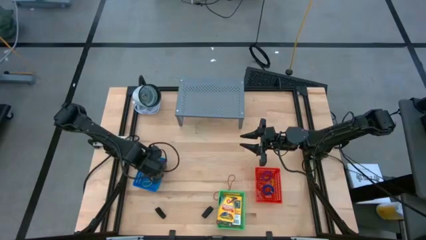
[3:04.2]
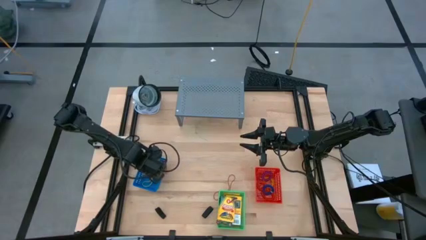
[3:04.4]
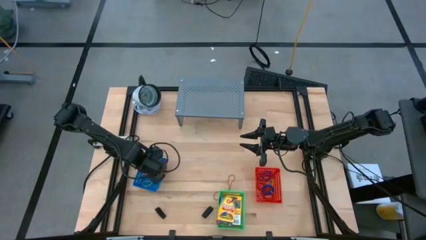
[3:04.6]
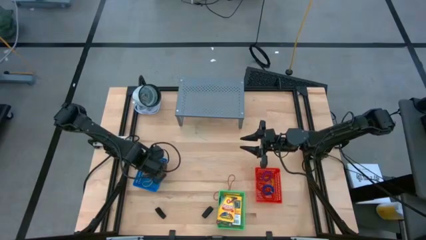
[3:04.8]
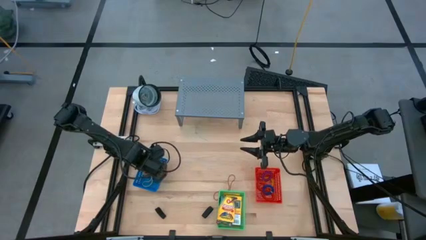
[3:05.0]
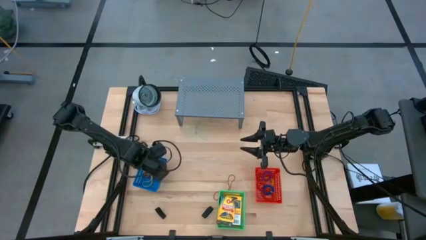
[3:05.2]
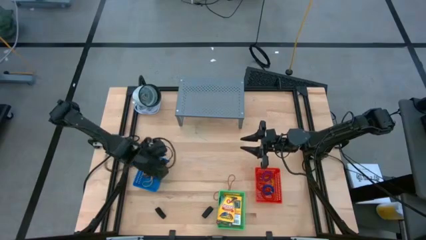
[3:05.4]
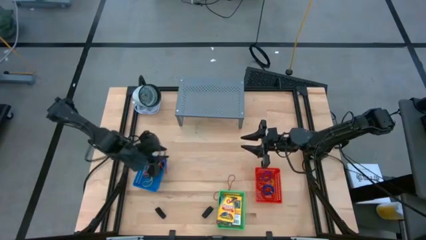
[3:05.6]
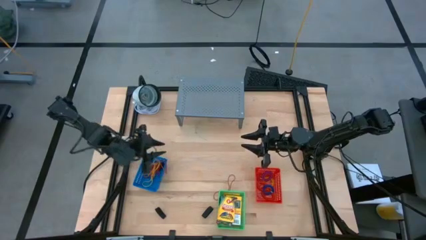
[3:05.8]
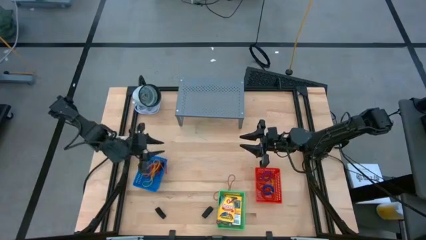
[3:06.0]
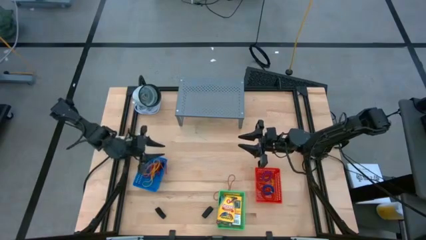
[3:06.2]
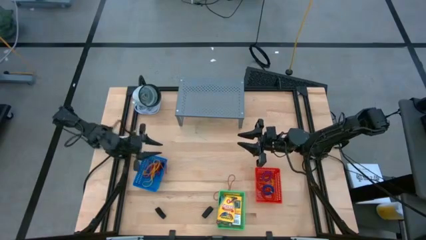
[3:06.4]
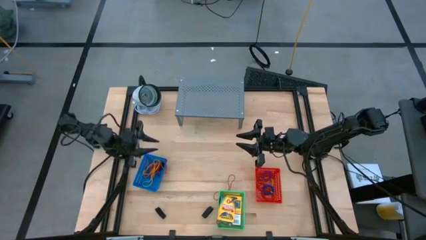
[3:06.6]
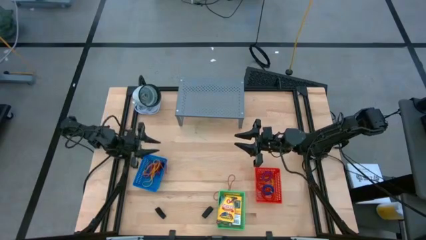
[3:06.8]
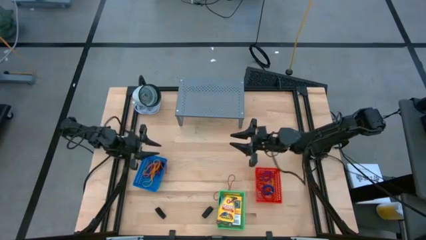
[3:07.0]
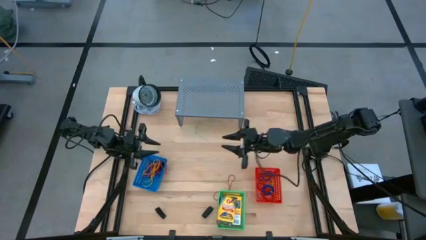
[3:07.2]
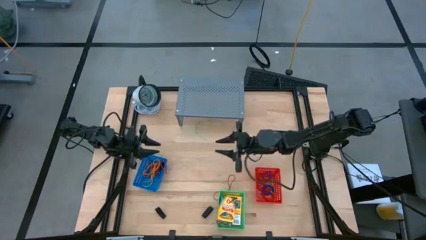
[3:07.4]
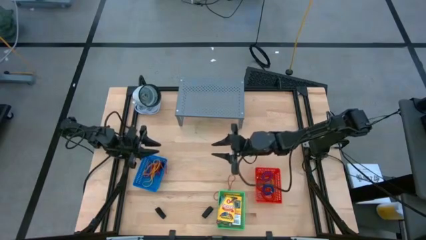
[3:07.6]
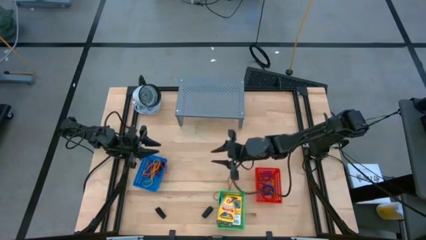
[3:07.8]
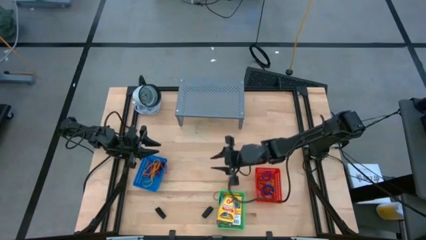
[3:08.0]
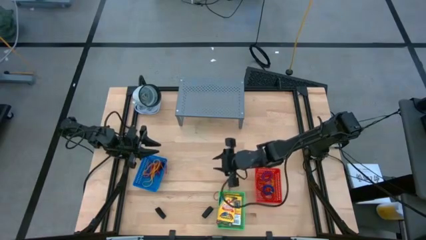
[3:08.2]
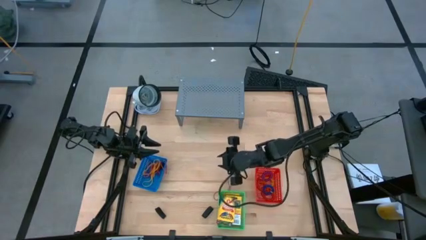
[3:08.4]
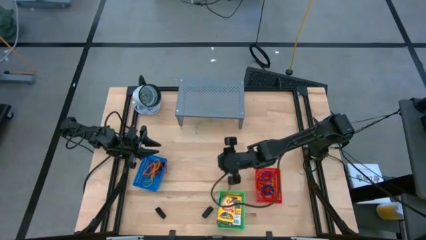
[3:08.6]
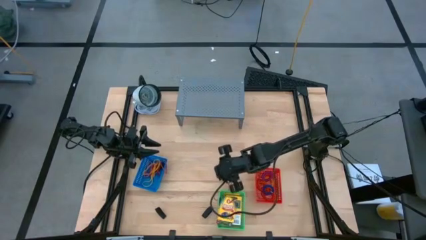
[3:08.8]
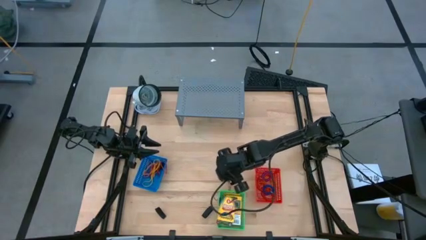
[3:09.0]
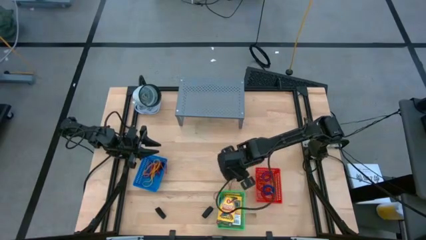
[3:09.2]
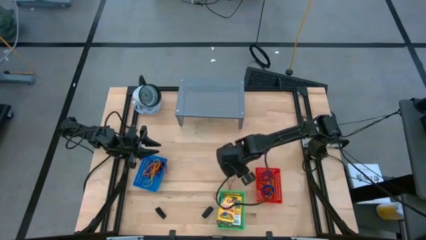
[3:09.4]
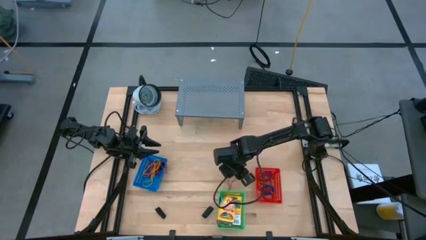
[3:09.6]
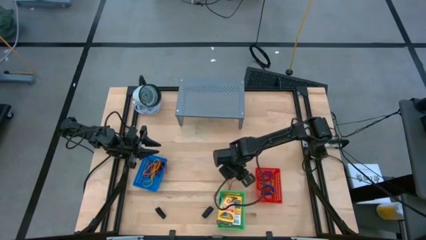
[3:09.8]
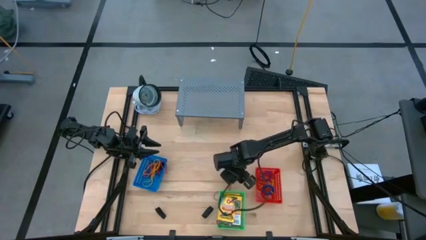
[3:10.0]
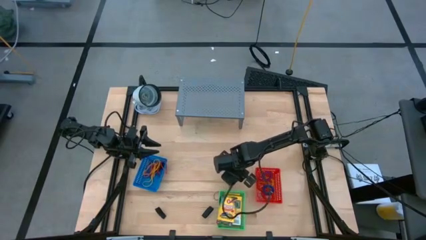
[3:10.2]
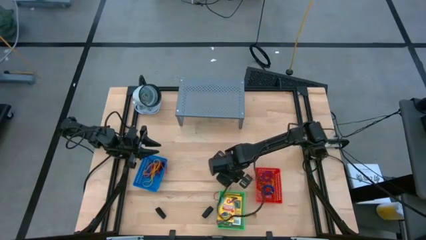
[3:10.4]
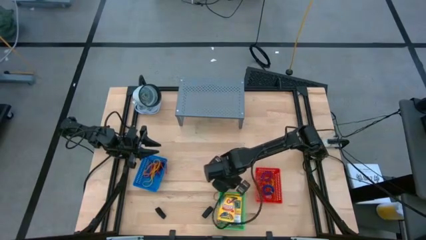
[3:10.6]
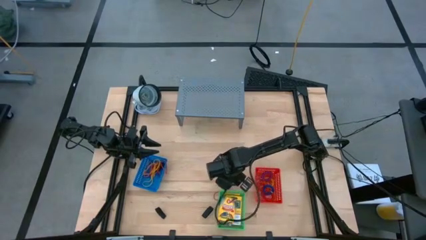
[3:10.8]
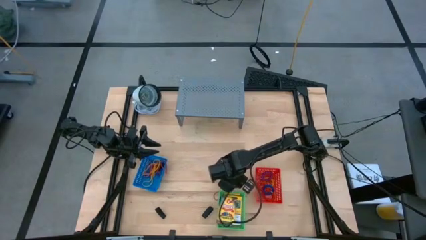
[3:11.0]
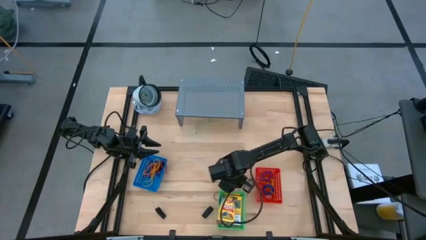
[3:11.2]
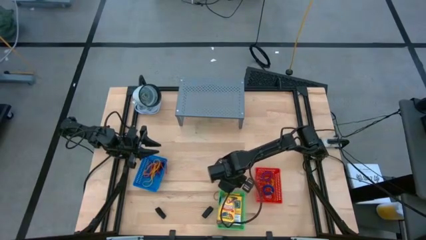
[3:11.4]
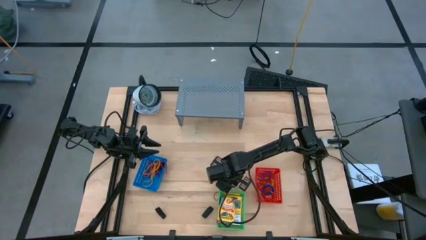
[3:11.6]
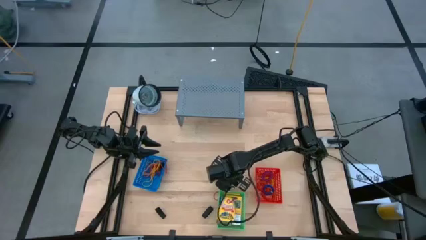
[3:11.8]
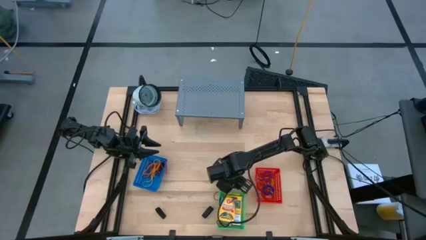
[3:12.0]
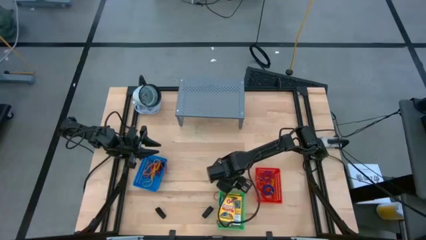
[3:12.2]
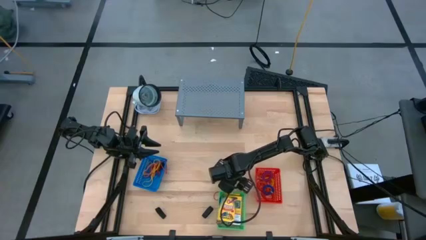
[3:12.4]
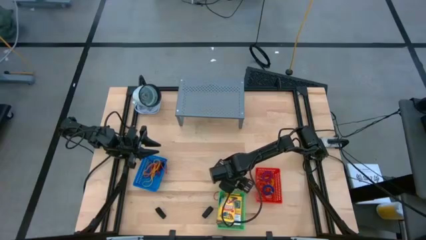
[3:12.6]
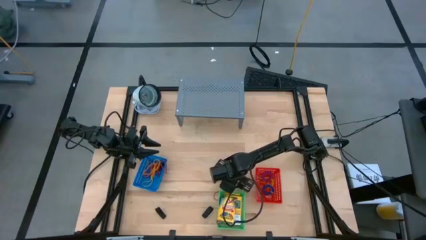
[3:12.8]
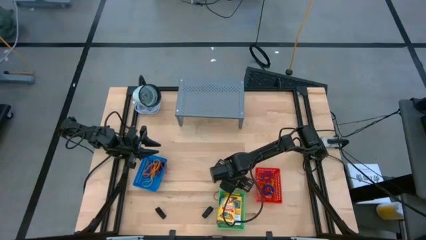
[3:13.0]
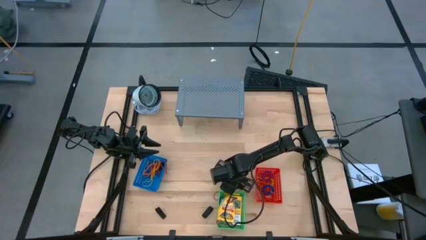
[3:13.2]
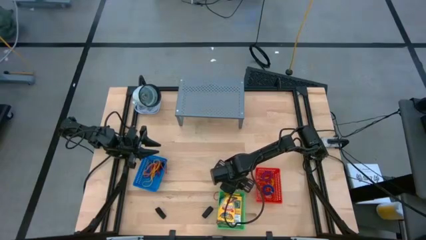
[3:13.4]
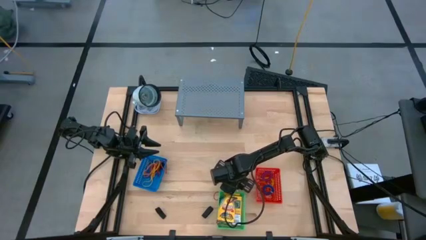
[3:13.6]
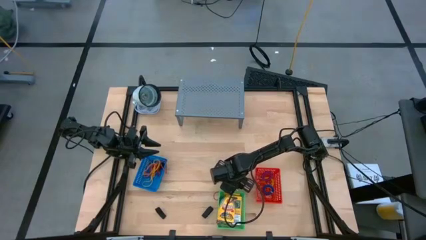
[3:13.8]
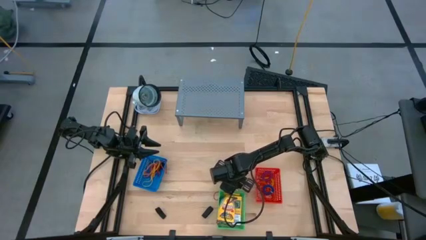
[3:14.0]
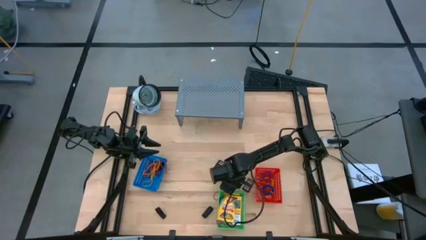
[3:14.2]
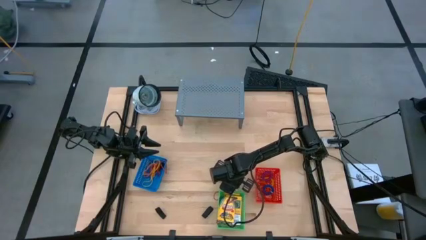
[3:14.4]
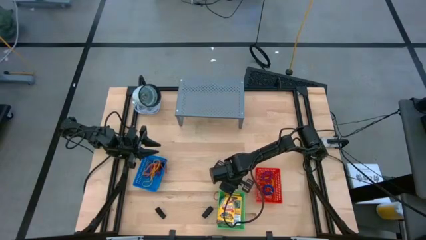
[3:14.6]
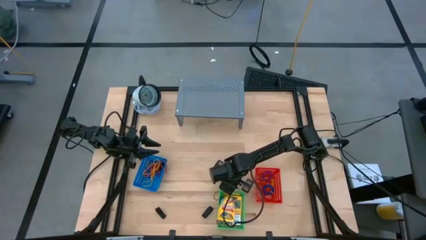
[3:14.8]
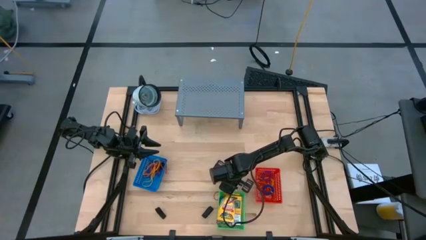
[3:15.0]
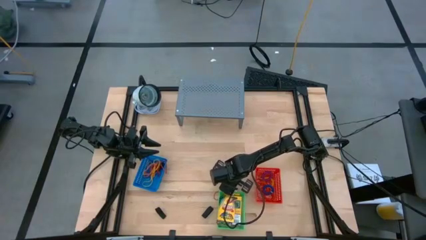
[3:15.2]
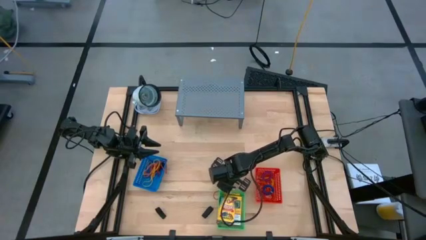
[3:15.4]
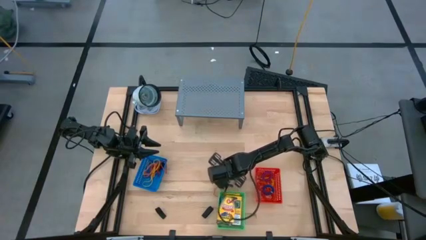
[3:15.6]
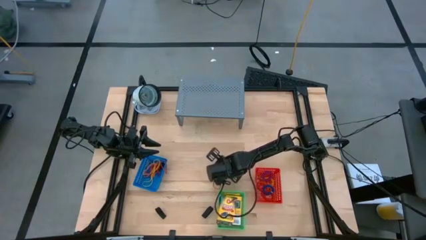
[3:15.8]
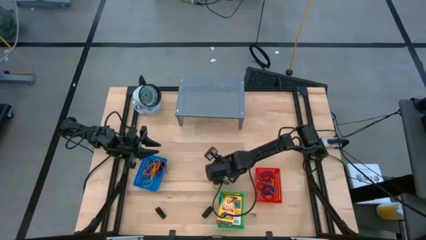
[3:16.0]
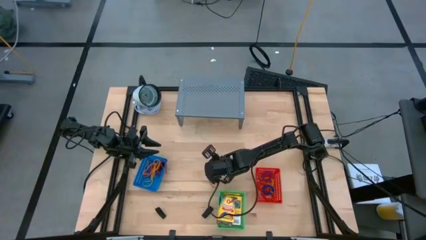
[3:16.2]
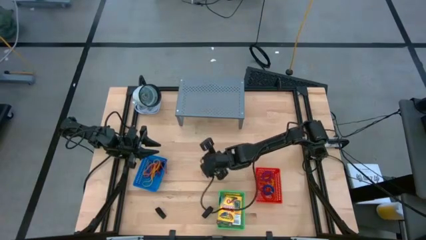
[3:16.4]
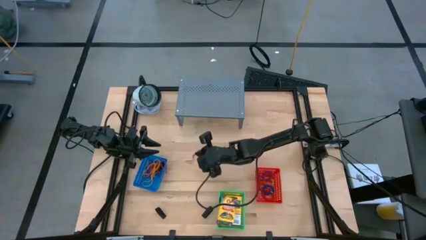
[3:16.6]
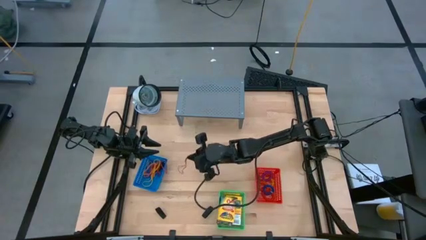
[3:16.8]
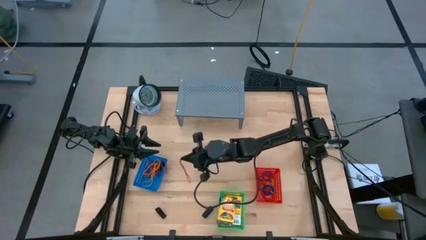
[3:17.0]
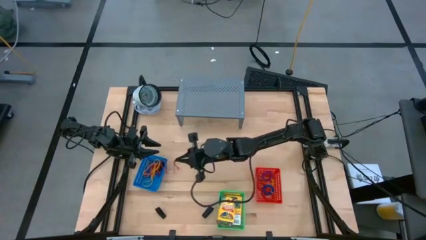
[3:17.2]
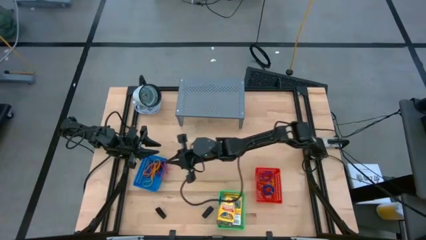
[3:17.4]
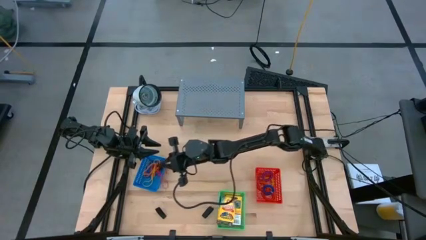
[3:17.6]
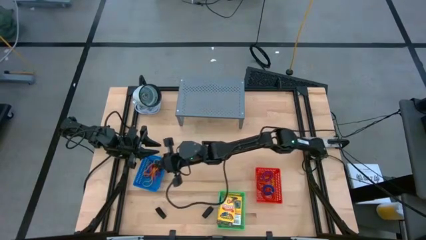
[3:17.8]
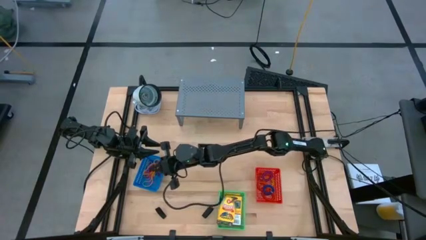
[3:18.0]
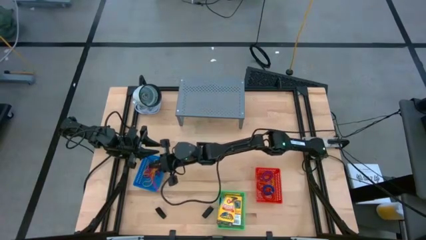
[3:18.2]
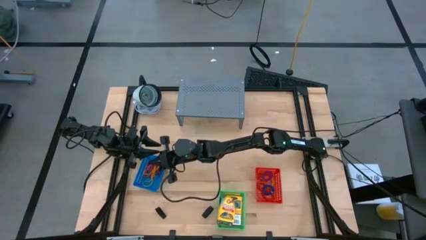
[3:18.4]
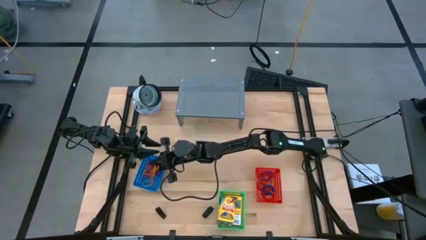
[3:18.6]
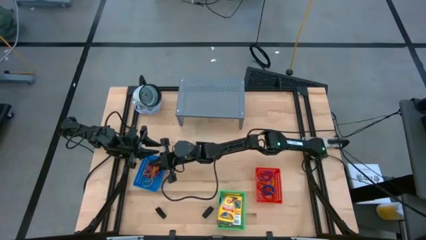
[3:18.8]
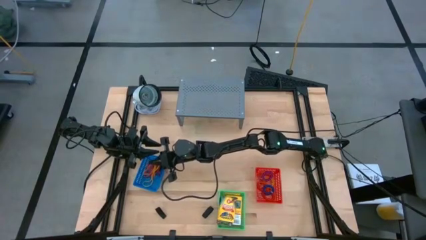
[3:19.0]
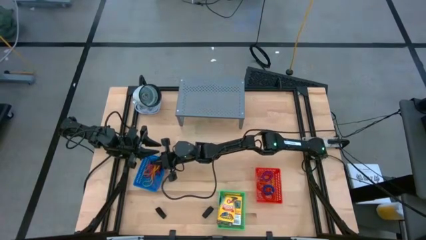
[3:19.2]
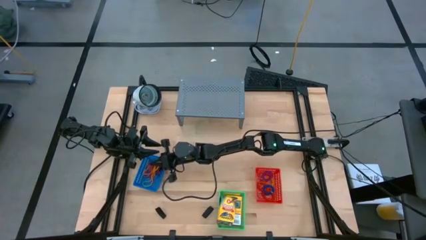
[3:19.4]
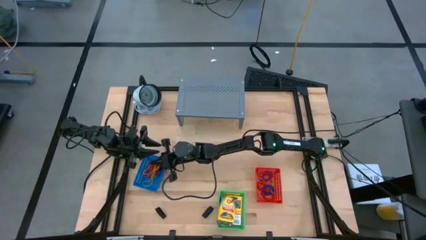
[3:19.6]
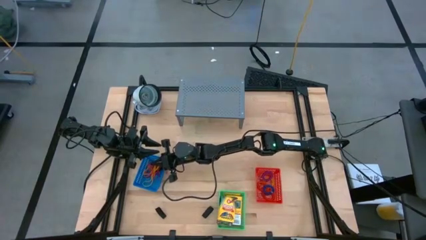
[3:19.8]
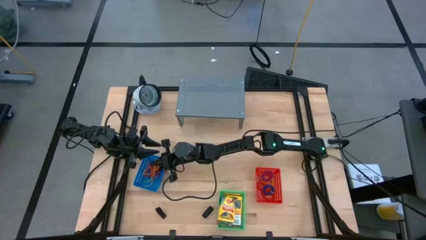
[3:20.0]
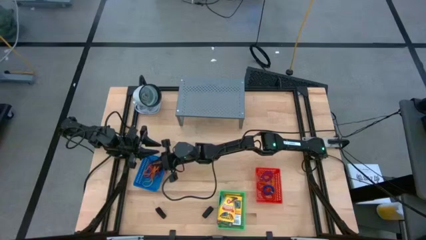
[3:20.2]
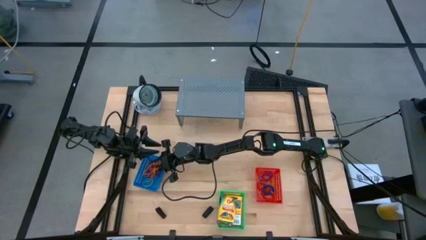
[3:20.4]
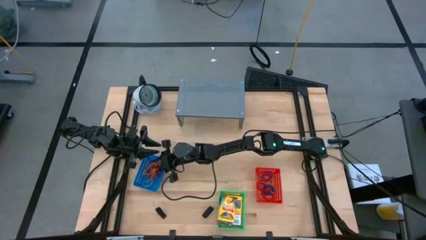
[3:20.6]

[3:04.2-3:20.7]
Task: Pick & Place Office Desk Supplies
Put the red rubber band into the blue bin
